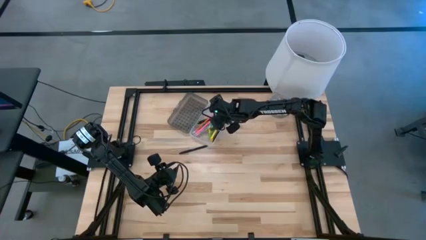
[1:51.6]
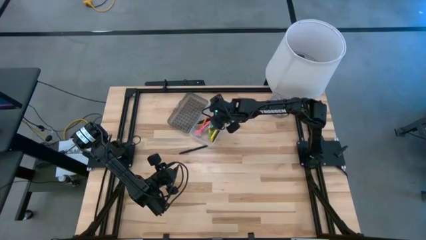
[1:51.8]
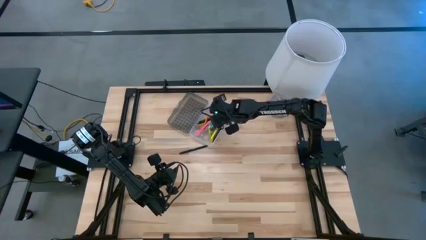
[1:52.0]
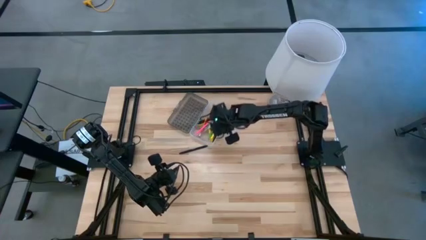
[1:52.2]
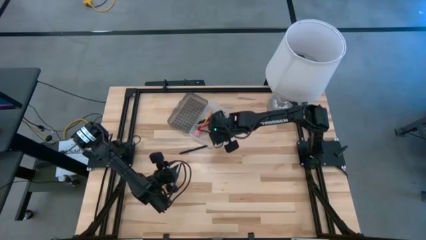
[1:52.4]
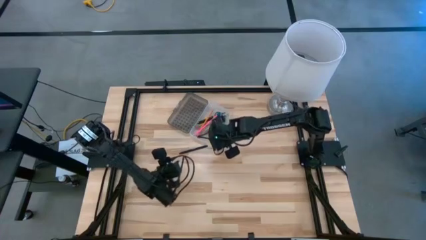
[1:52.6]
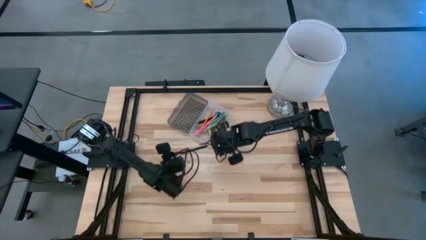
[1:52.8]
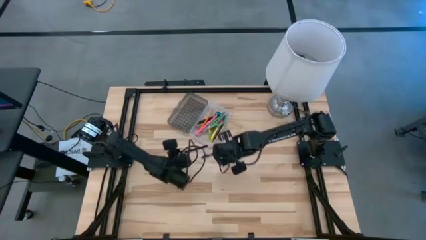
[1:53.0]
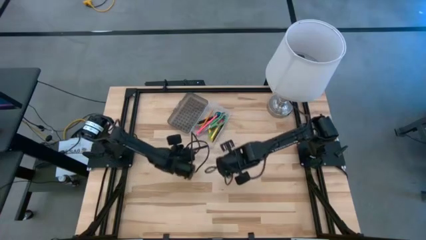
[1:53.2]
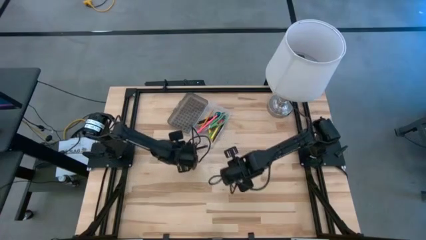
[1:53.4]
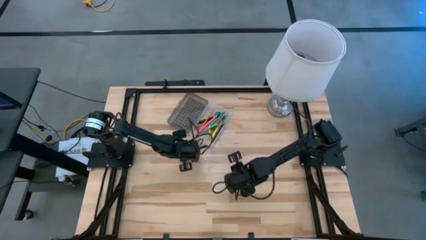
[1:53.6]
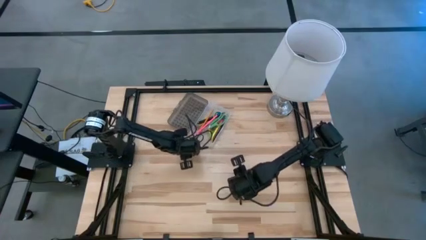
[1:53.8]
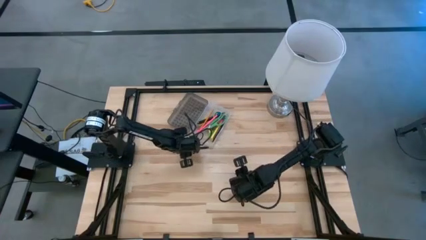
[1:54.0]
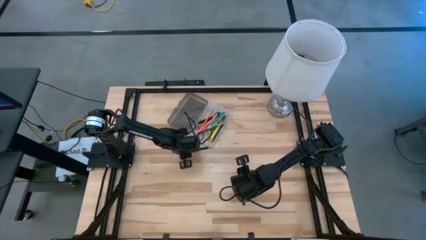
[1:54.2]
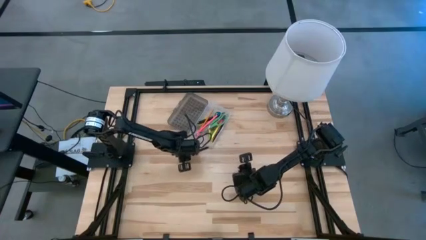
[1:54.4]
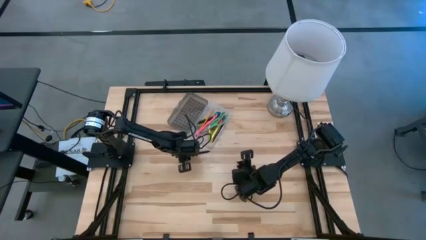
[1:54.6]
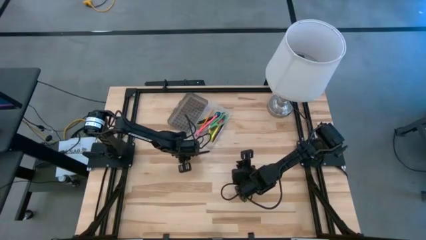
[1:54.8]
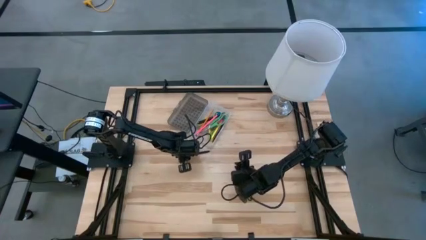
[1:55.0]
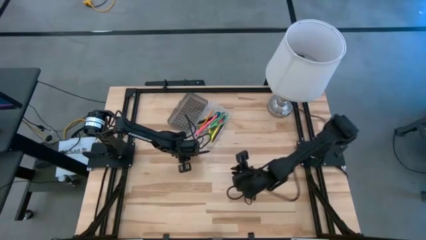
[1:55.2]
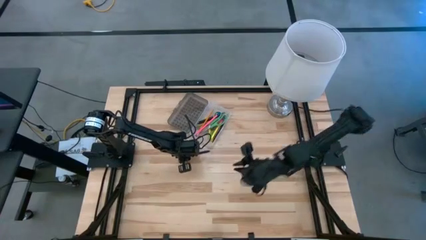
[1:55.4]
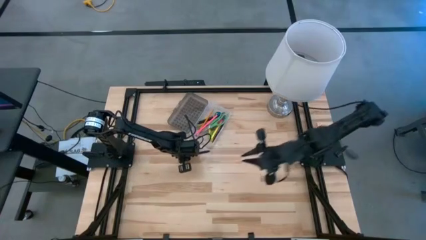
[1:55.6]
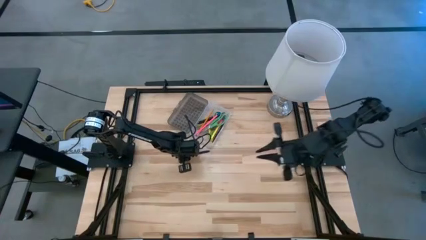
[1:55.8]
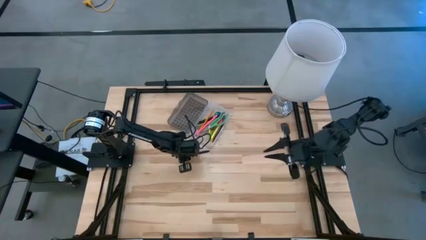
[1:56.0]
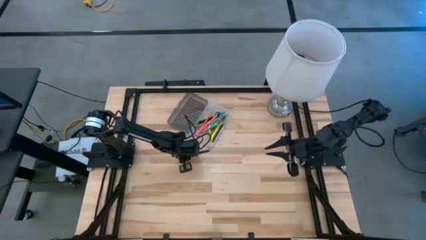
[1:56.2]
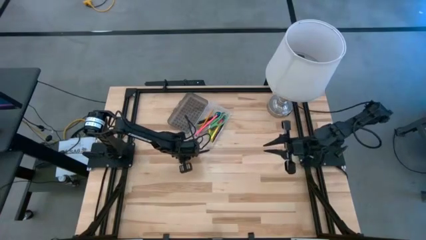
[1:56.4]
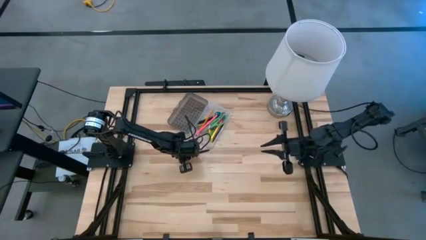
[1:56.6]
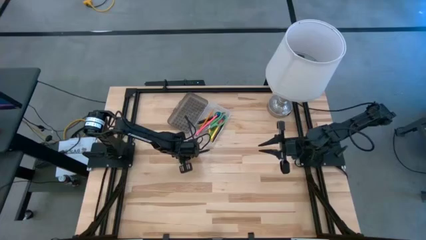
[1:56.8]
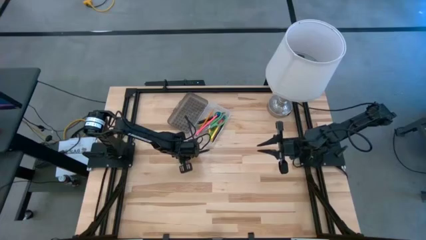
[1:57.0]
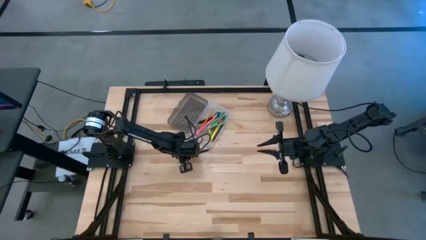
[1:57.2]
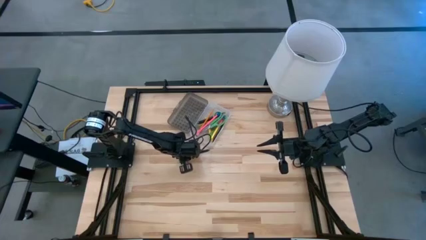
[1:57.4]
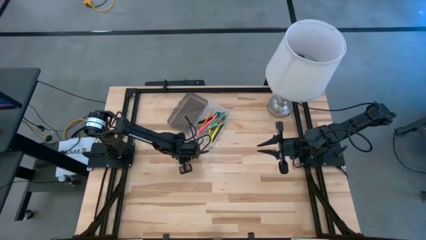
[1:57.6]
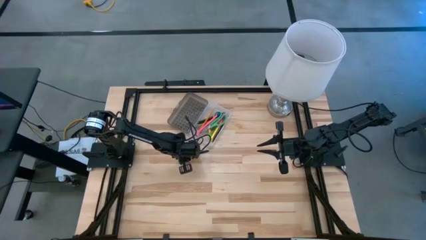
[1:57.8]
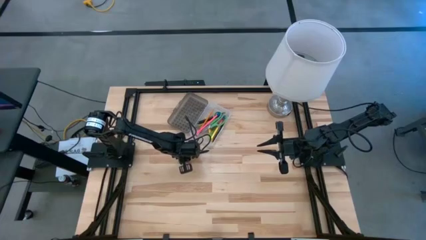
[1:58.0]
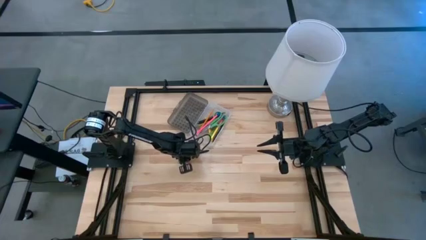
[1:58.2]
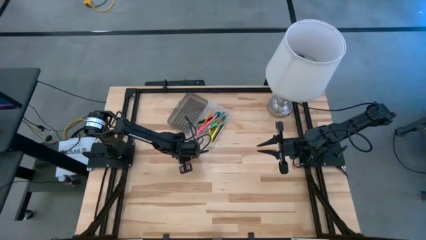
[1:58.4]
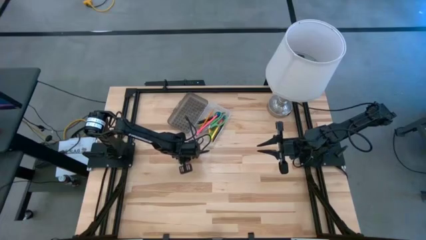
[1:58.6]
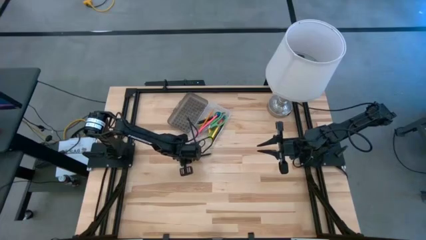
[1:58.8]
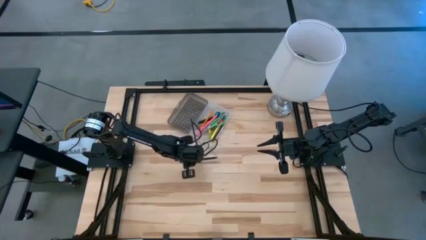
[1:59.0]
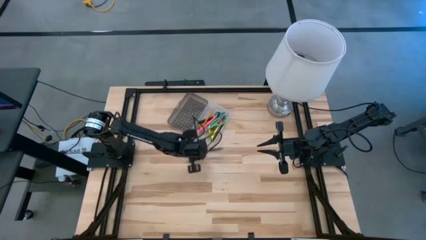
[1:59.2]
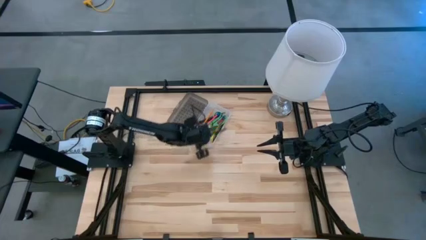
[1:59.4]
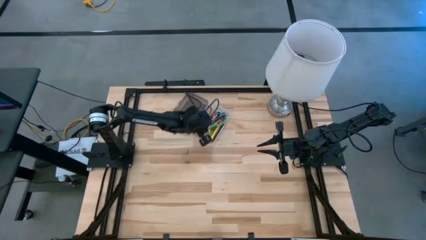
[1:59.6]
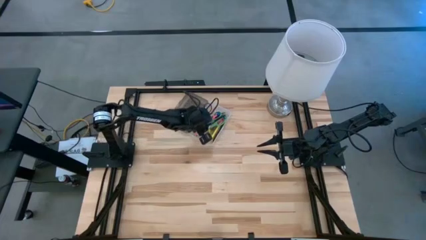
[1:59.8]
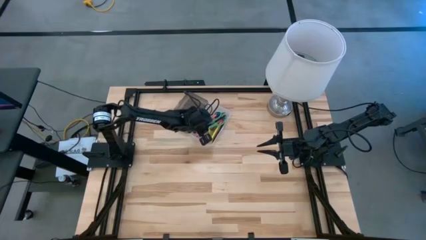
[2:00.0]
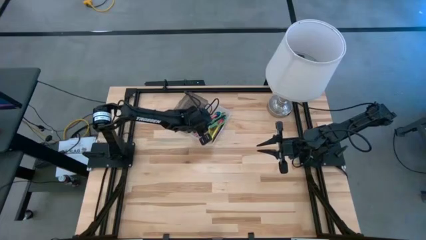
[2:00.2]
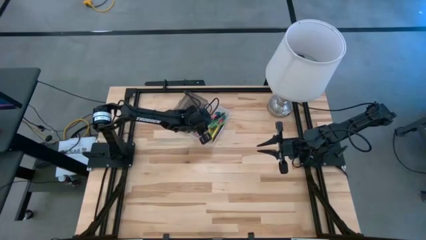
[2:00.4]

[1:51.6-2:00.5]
Task: Pick & place school supplies into a supply box
Put the black pen into the supply box

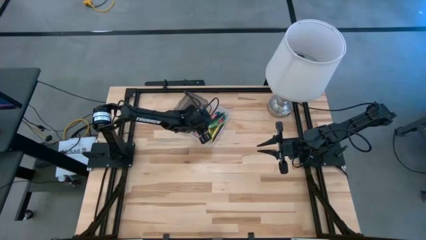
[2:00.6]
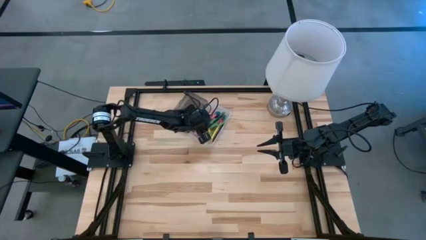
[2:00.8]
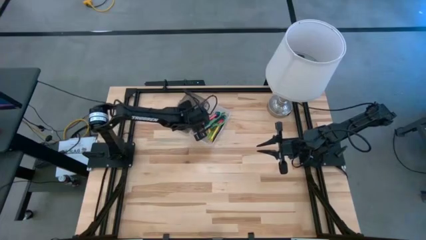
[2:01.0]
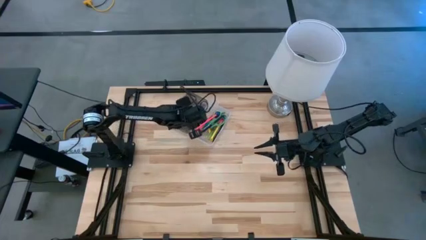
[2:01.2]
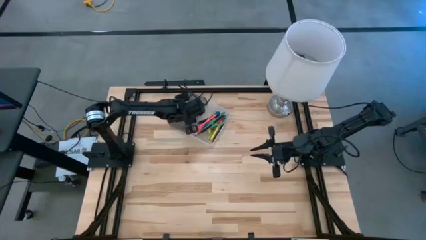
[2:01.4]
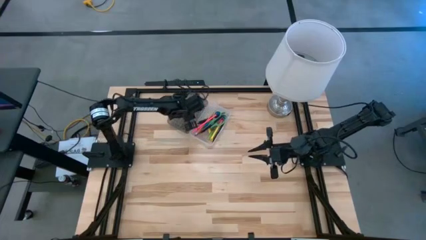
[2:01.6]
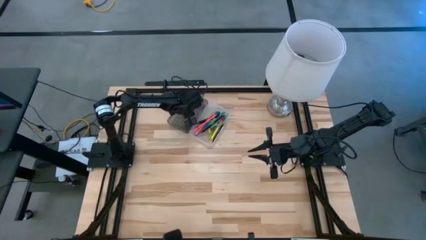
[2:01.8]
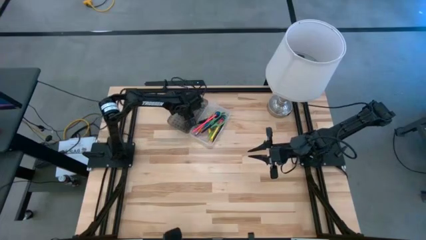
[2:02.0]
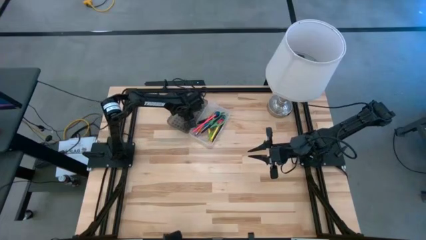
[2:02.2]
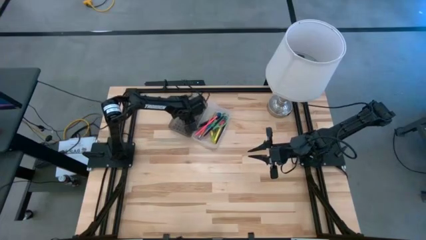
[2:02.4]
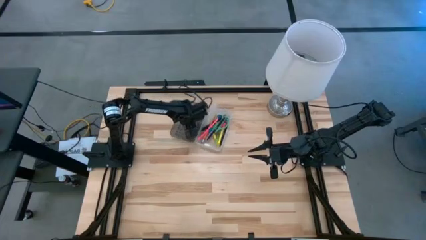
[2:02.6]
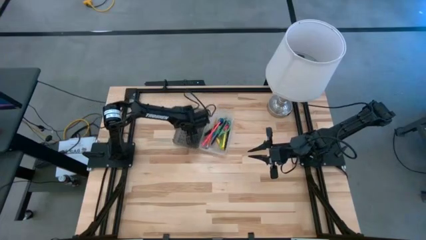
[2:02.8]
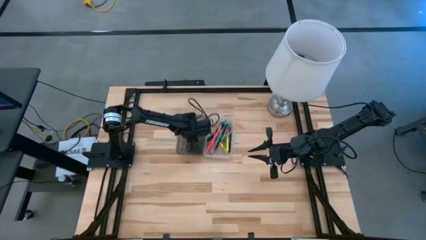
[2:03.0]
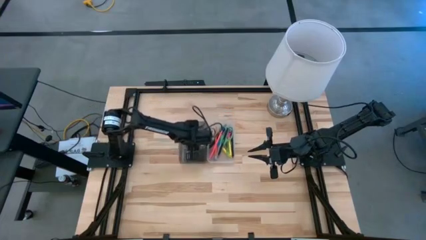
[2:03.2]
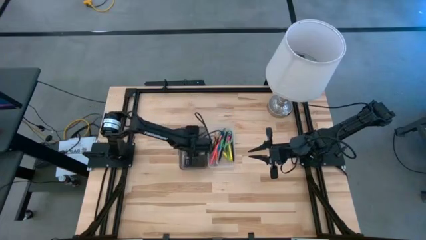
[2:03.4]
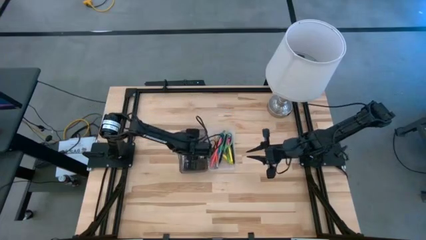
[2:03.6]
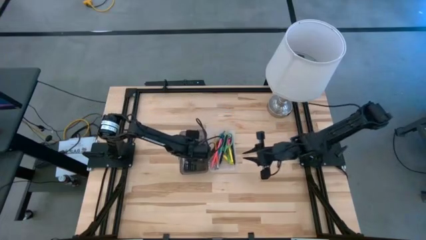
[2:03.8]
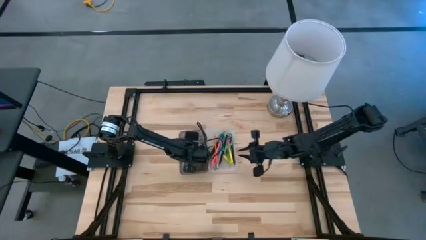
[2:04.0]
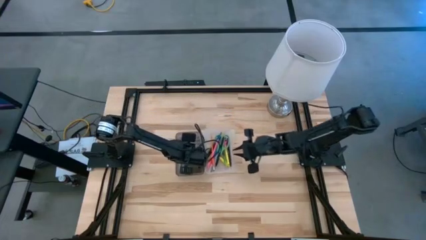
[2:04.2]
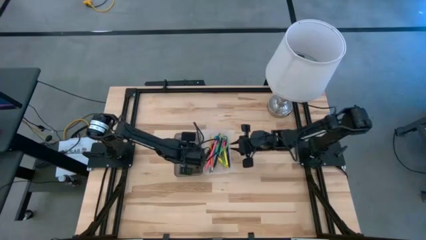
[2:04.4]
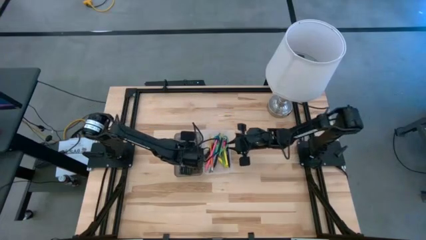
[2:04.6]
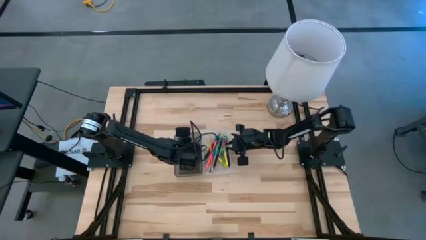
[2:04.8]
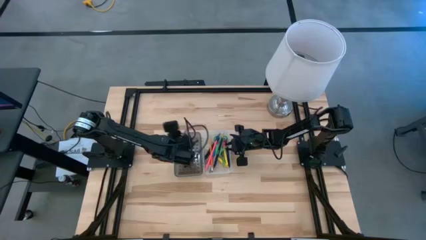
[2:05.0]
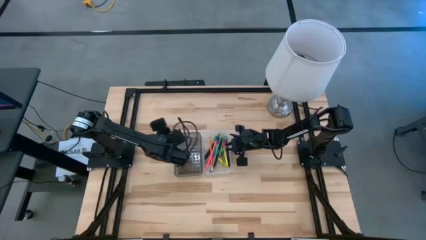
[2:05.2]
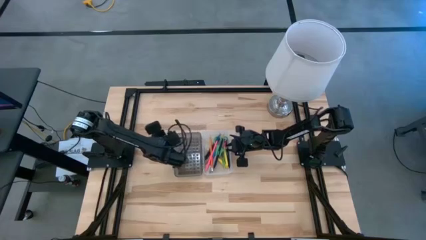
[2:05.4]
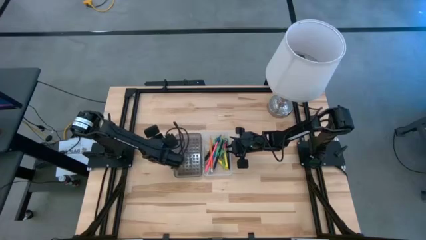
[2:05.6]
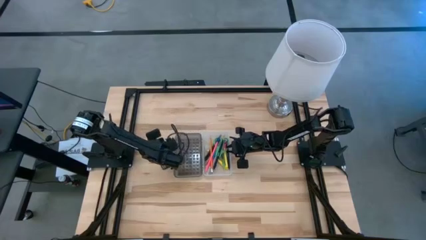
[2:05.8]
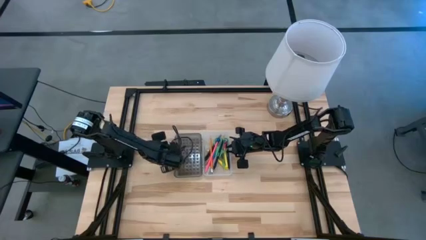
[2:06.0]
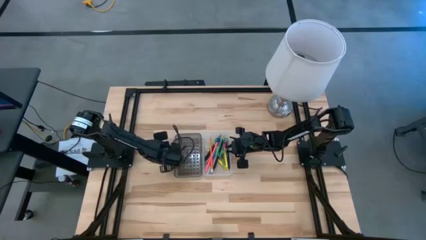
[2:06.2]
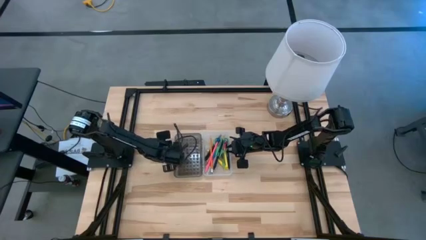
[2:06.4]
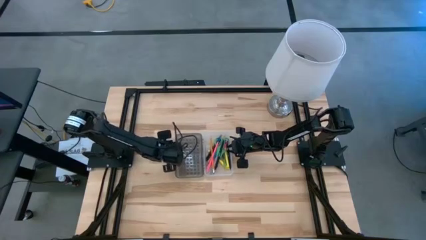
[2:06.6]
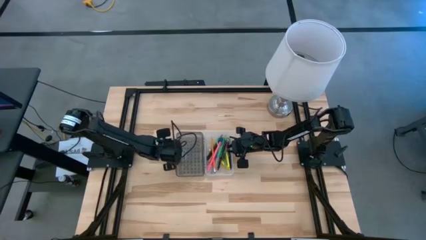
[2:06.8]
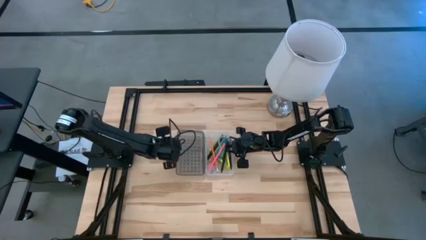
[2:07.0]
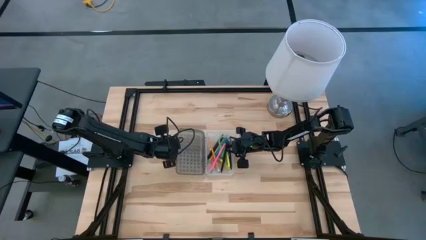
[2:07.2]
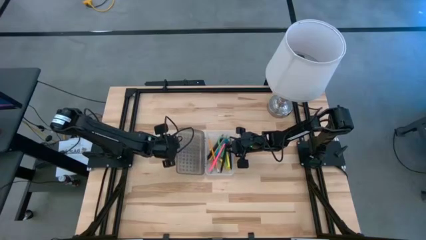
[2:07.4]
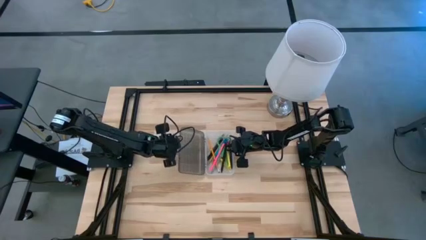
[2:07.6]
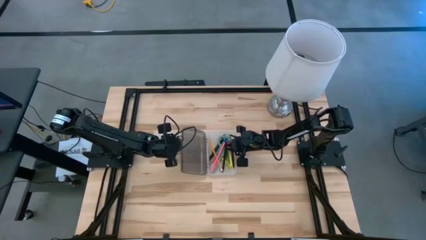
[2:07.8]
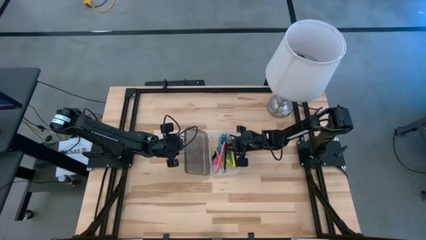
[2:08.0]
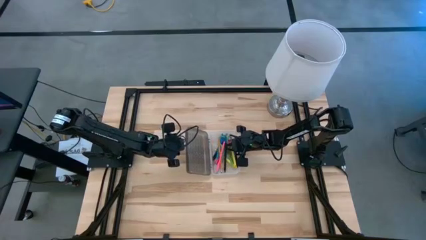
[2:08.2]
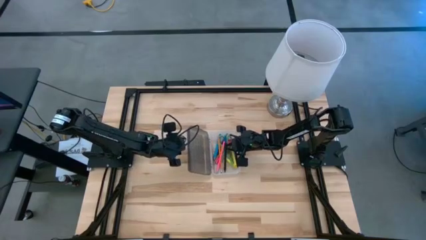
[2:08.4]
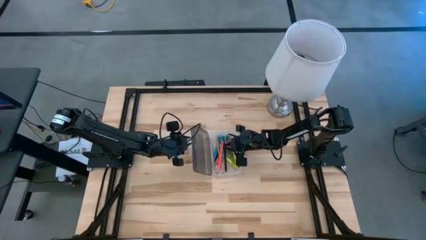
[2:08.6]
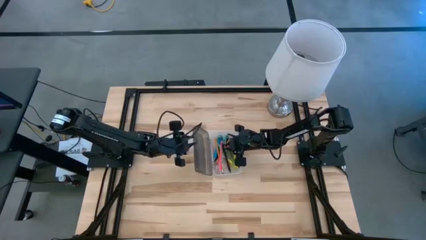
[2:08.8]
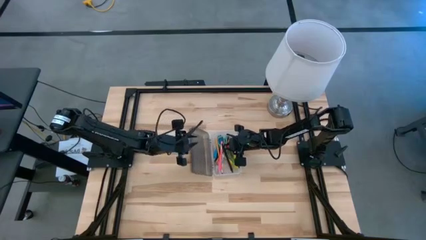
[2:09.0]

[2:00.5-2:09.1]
Close the supply box
